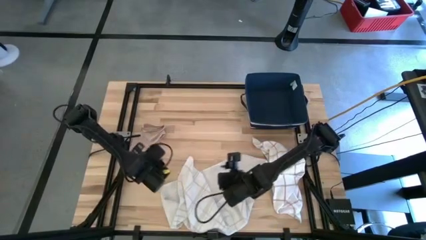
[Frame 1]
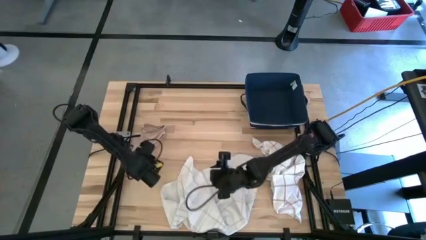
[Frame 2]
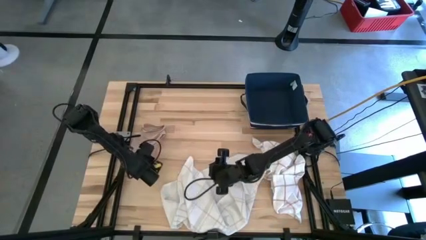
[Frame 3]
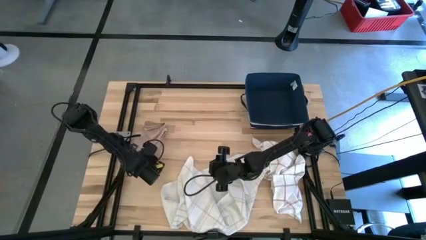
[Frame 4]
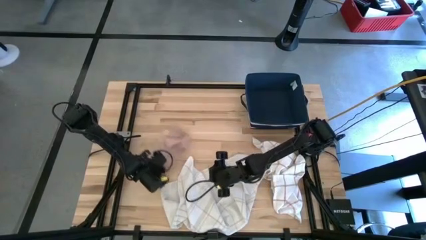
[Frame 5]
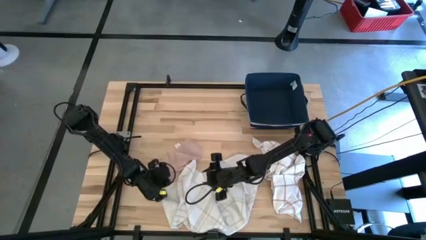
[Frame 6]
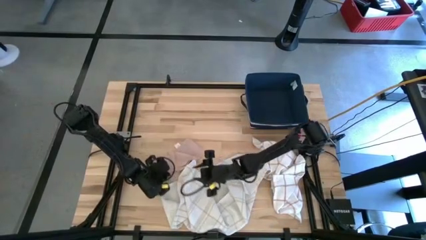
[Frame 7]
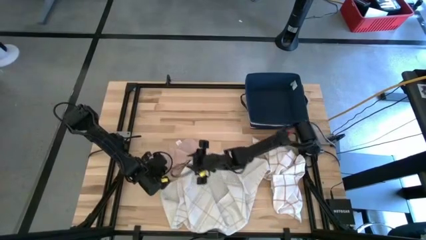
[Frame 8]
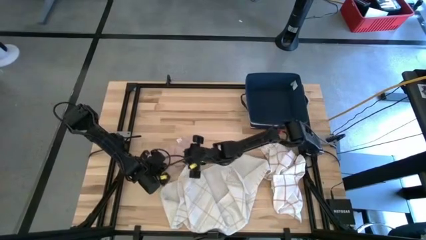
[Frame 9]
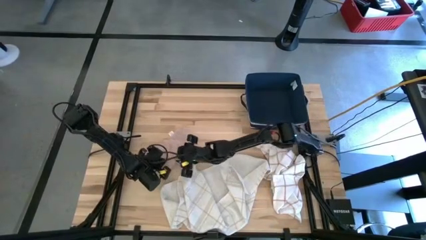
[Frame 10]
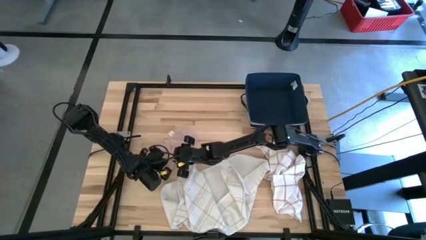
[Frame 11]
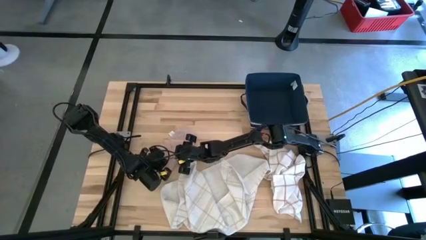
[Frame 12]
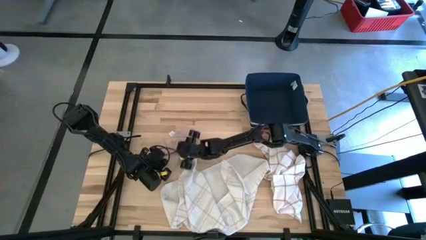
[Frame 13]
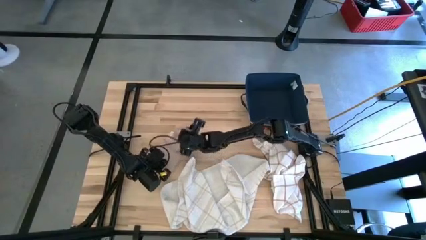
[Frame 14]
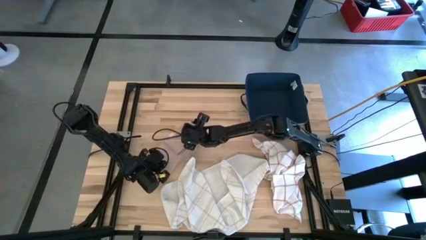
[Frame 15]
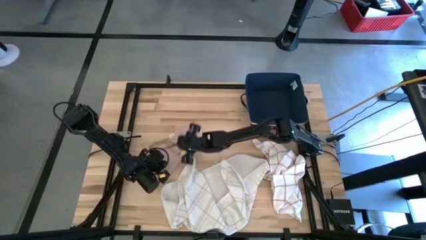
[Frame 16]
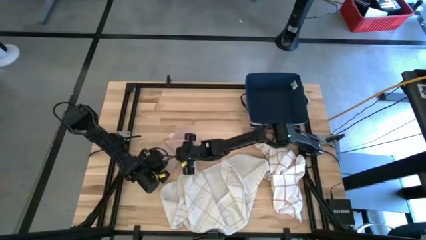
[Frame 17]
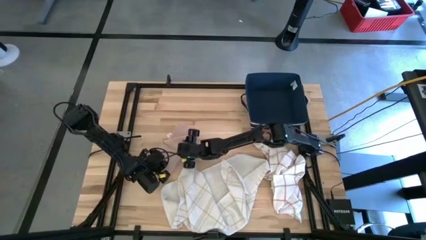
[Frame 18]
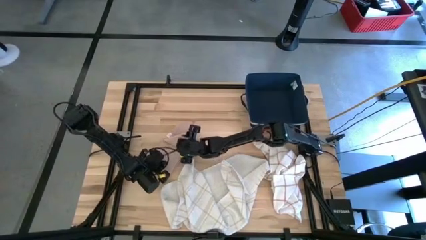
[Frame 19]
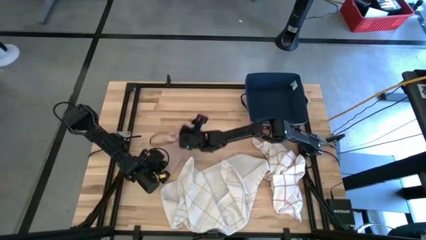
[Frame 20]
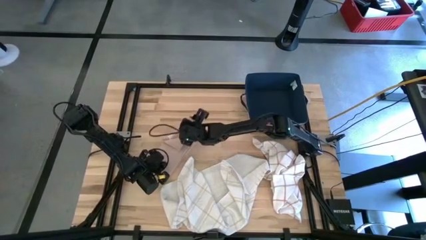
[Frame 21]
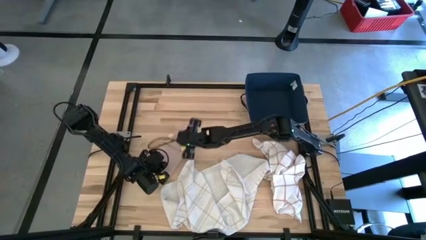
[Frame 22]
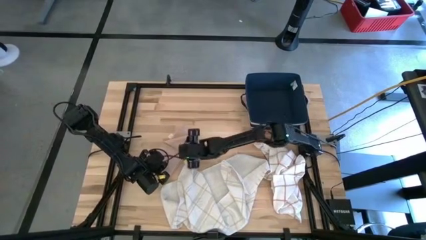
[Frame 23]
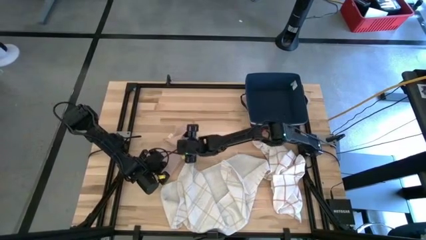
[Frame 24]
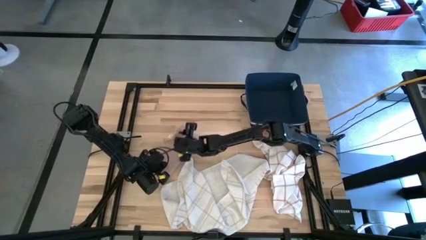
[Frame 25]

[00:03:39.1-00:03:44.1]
Task: Fold towel
Adjust the pink towel

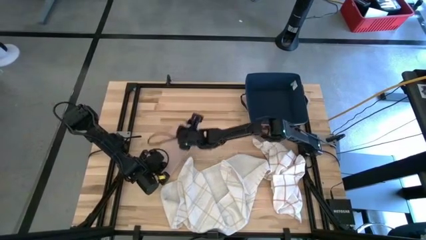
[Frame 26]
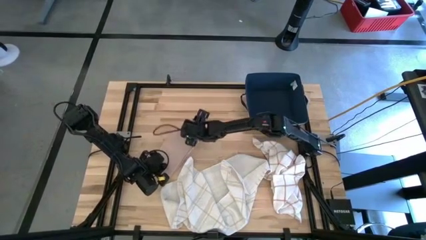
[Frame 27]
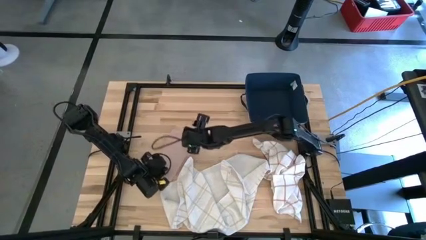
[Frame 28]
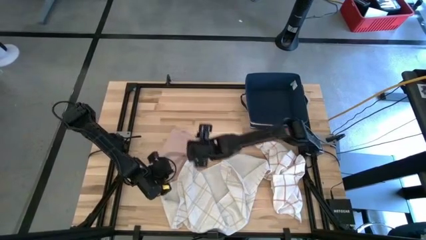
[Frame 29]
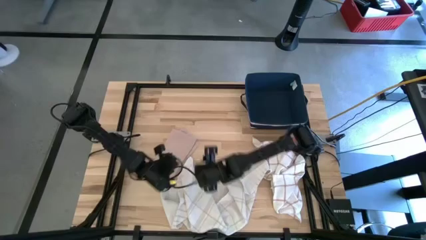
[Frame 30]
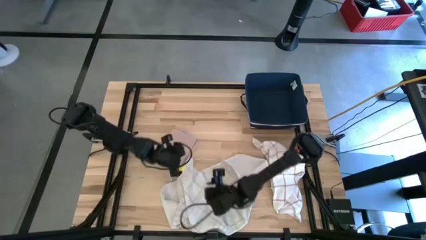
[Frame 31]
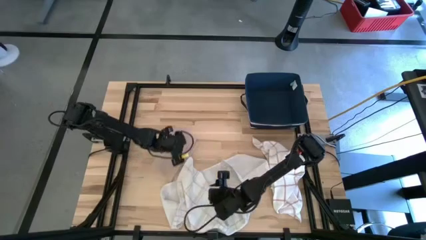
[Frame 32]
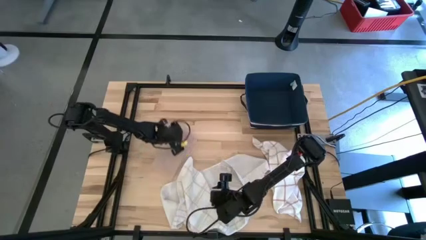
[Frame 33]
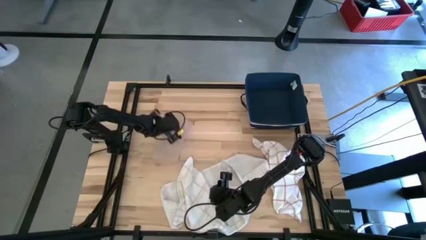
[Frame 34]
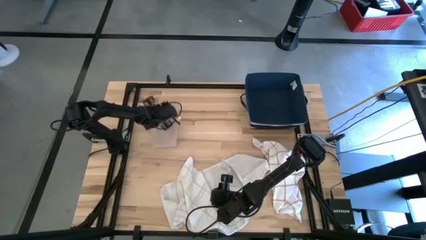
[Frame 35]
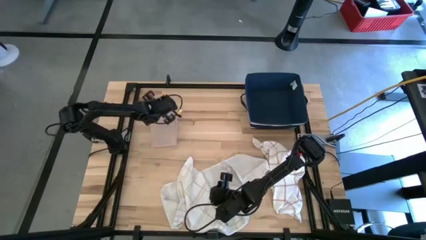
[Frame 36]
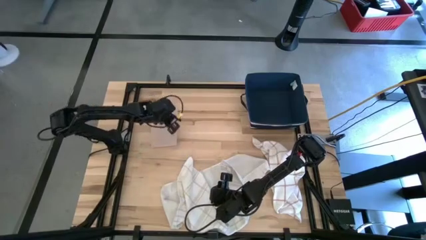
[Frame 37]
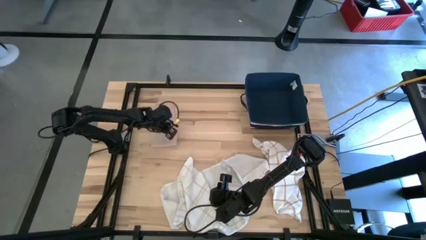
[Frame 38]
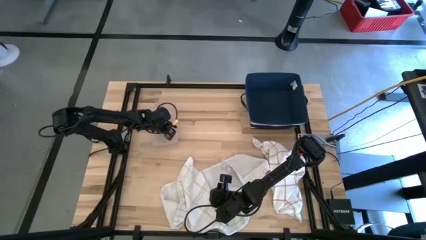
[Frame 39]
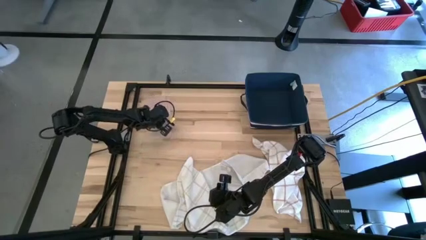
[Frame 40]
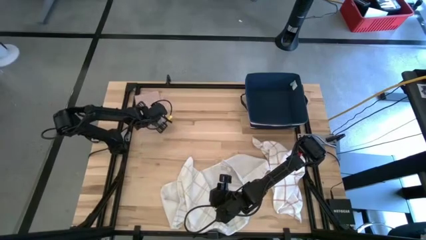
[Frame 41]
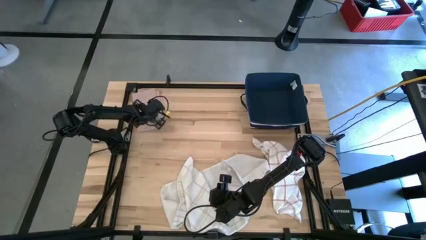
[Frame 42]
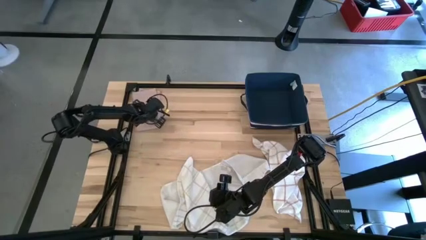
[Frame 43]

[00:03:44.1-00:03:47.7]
Move the pink towel to the top left

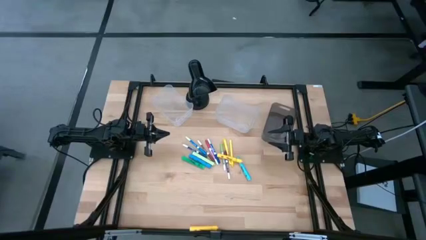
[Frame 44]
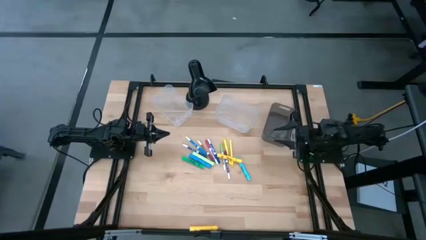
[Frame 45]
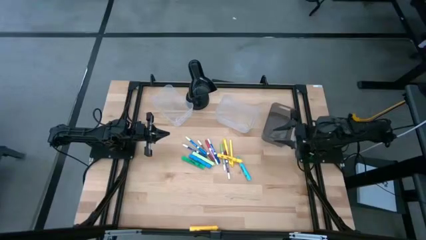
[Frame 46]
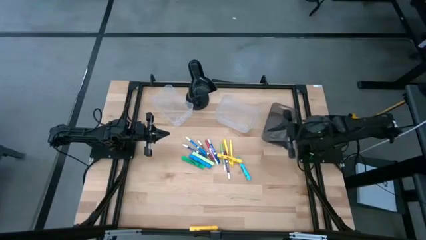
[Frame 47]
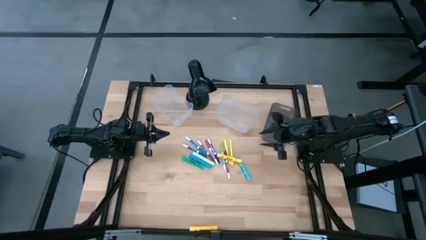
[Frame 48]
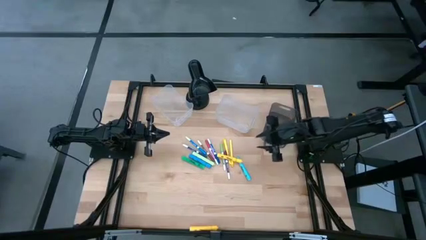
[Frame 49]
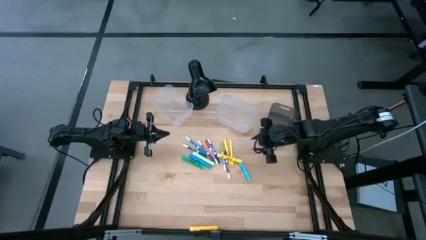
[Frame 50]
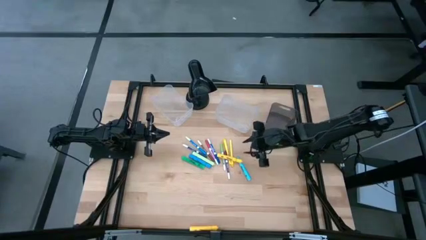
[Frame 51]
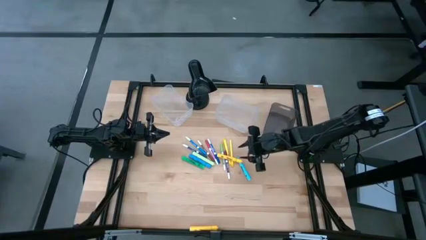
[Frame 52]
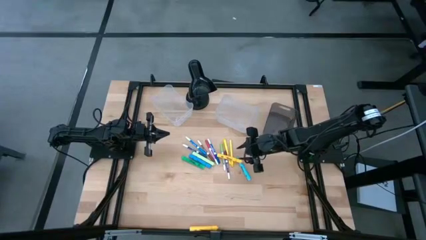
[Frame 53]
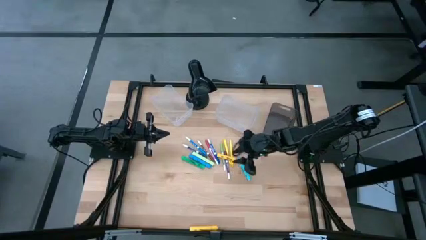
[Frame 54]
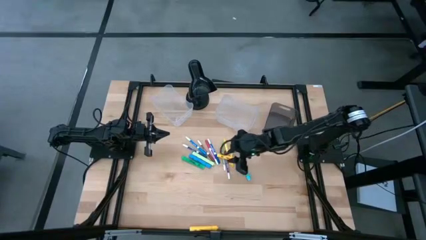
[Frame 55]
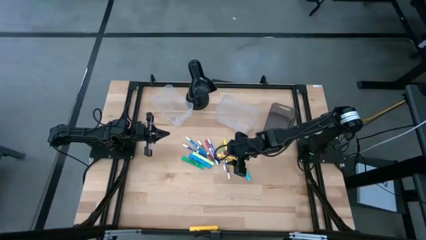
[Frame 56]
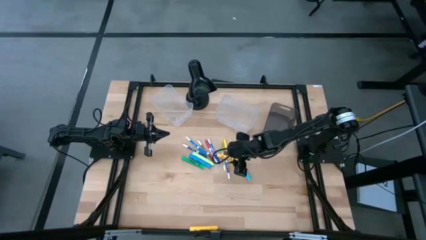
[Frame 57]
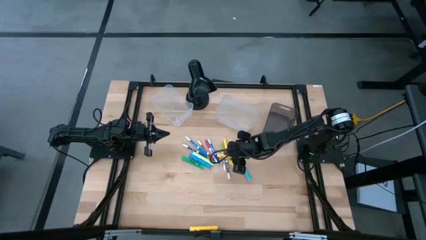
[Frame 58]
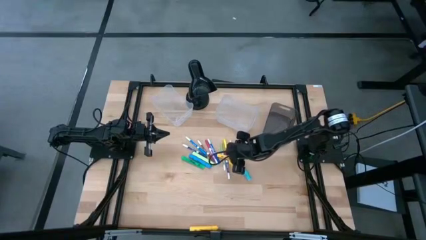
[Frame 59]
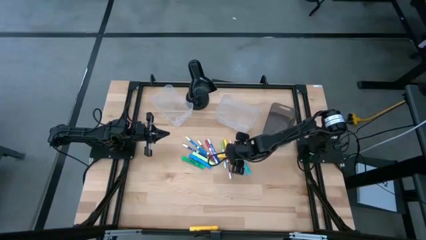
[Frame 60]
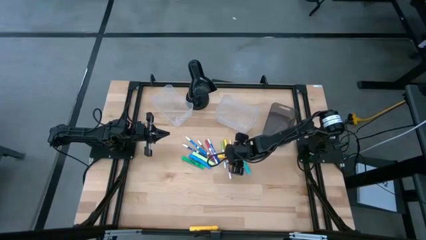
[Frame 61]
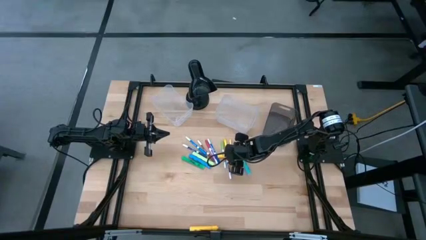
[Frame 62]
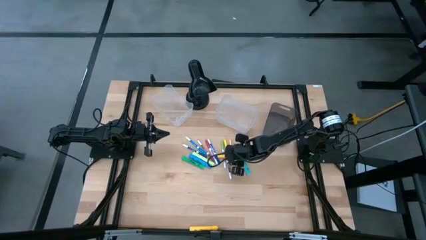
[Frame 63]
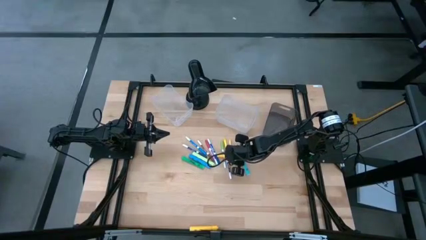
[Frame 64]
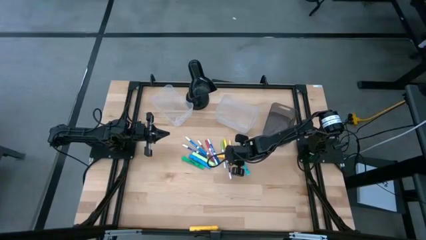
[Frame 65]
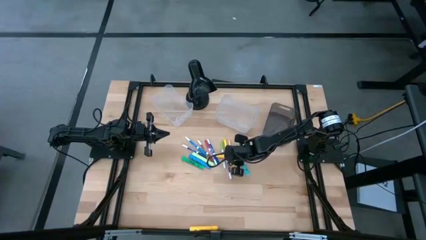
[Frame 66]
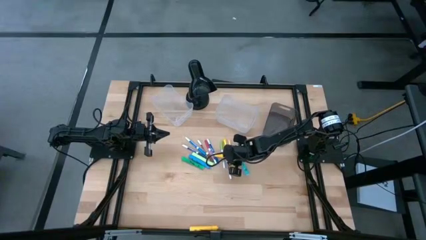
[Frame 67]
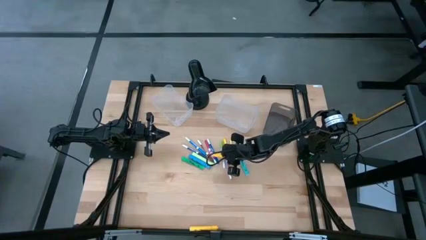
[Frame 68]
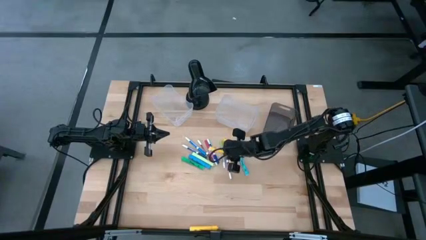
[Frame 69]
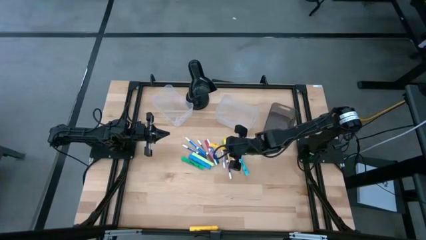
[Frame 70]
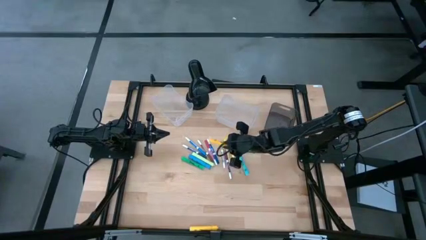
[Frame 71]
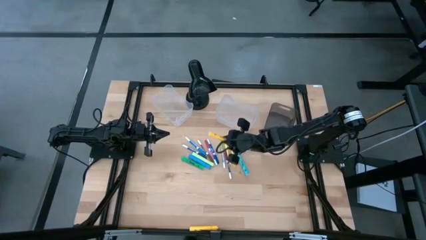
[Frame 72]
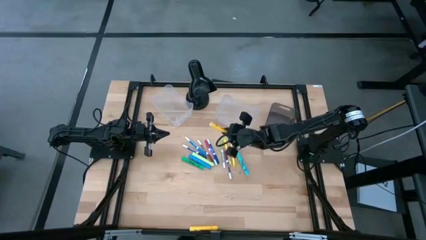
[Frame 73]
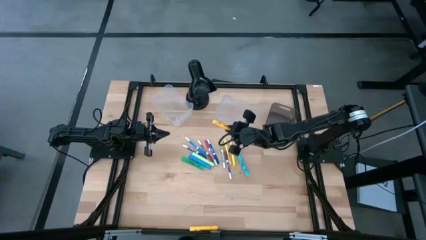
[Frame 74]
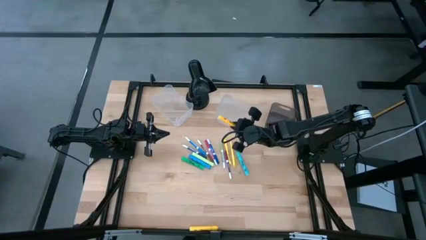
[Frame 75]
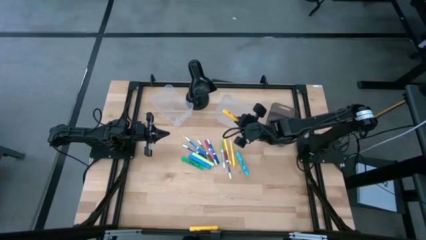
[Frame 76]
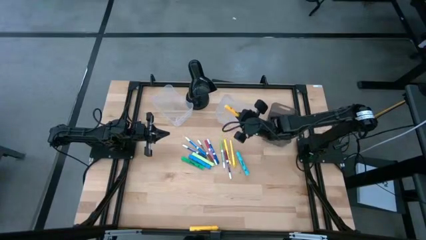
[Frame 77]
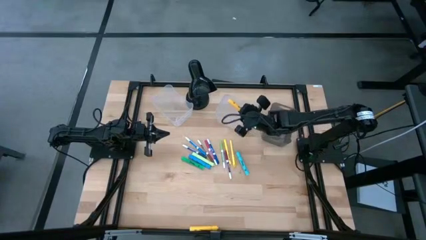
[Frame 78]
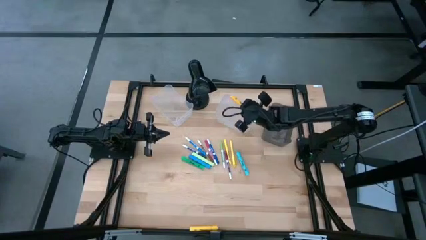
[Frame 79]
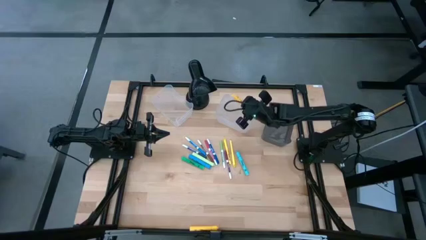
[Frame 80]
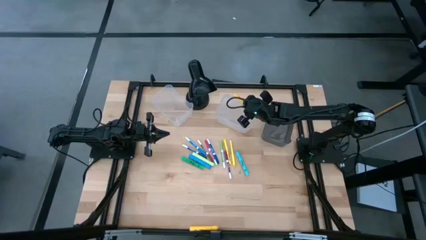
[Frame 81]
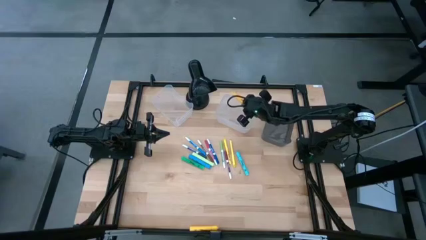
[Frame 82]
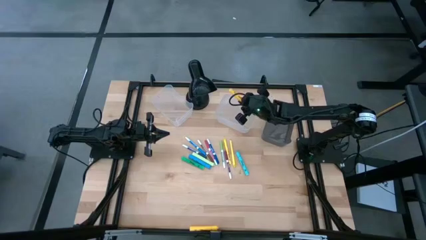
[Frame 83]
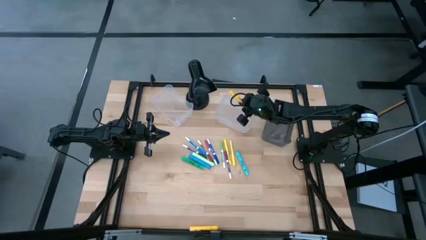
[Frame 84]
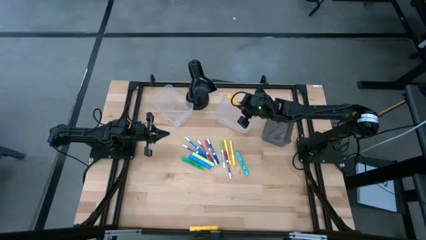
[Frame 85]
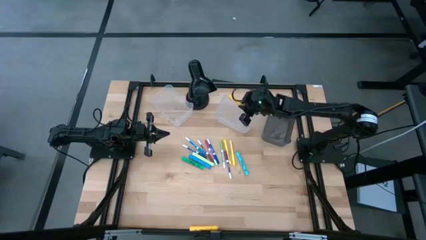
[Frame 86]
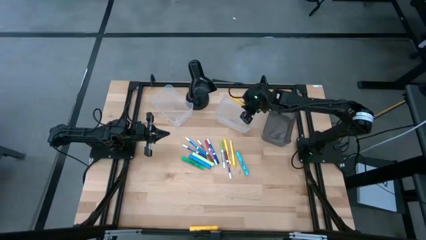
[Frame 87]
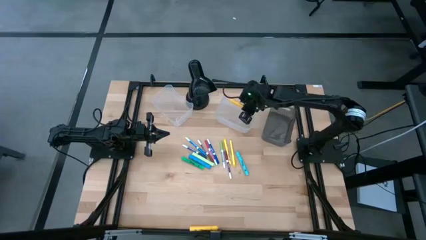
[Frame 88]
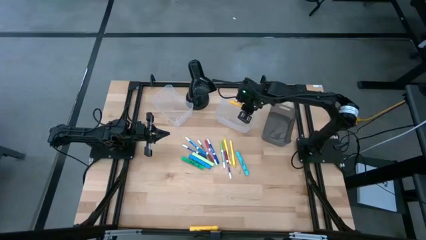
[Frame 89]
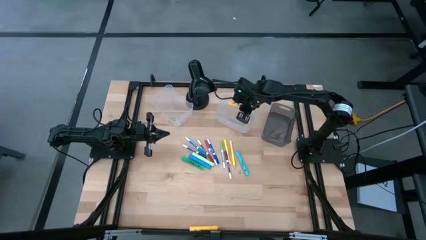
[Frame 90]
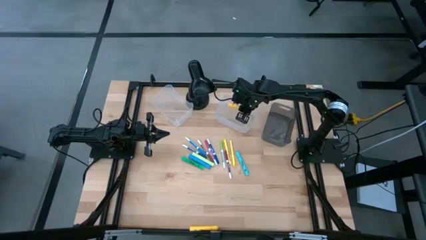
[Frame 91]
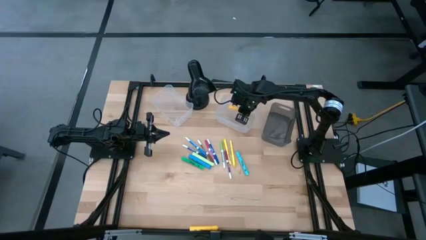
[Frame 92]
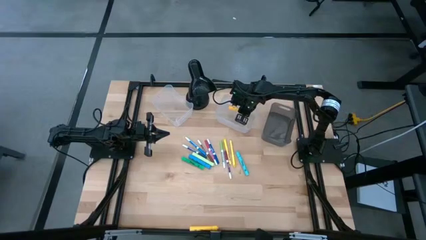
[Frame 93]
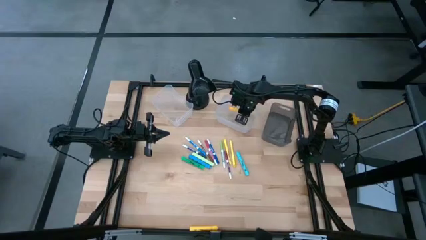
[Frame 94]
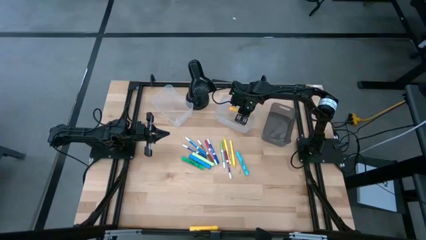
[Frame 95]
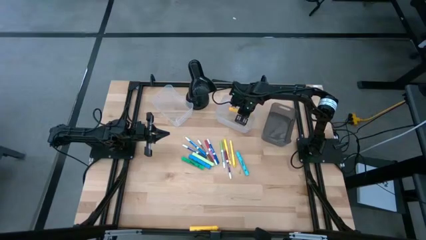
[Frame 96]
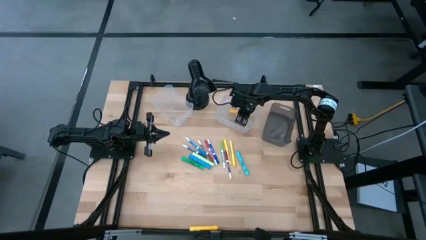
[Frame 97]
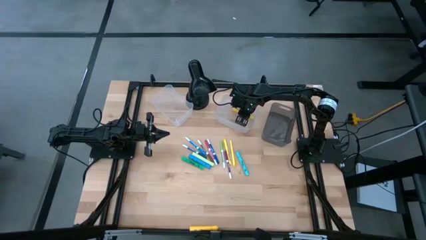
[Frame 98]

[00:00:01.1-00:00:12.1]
Task: Pick & Place Markers
Put the top yellow highlighter in the right transparent bin
